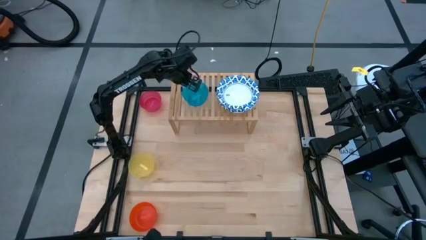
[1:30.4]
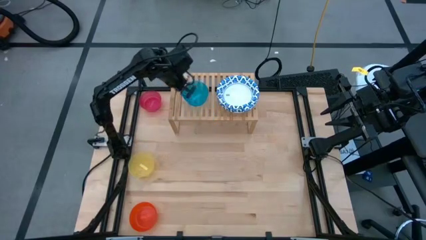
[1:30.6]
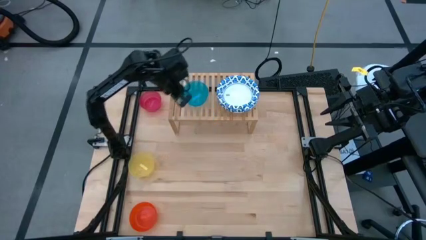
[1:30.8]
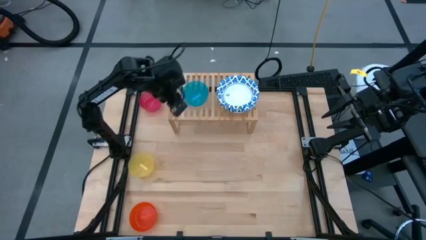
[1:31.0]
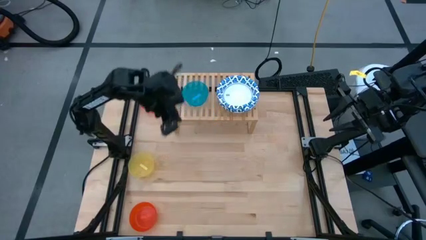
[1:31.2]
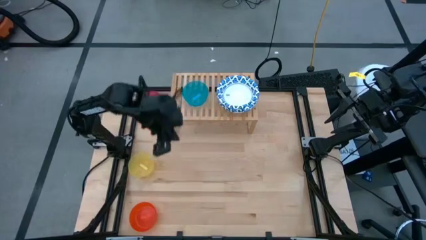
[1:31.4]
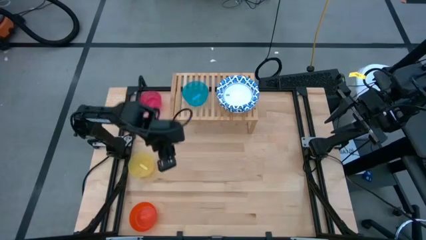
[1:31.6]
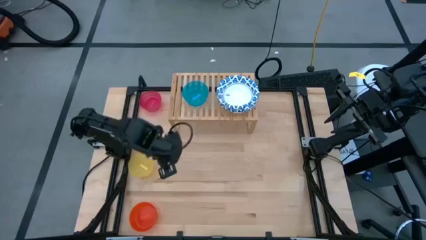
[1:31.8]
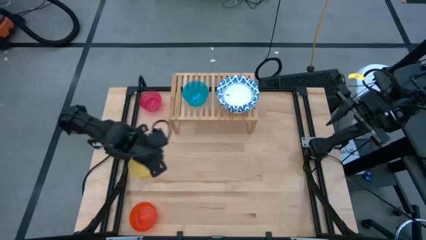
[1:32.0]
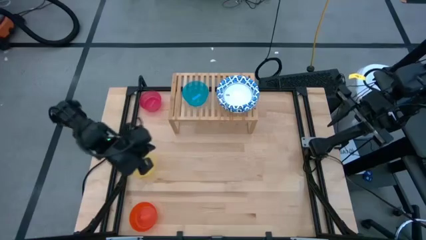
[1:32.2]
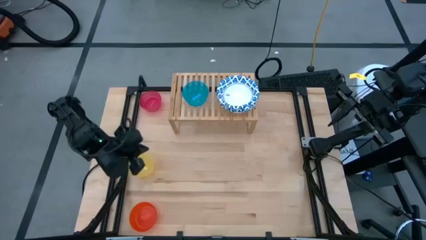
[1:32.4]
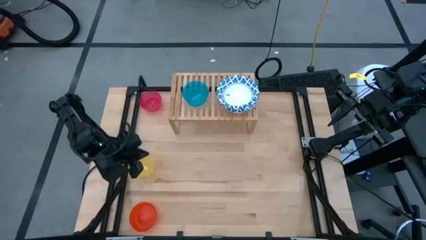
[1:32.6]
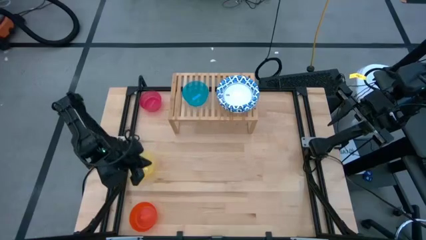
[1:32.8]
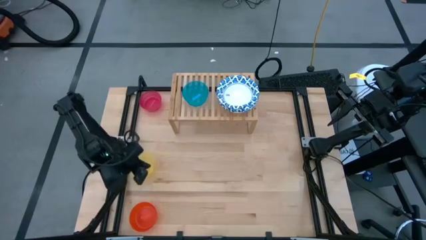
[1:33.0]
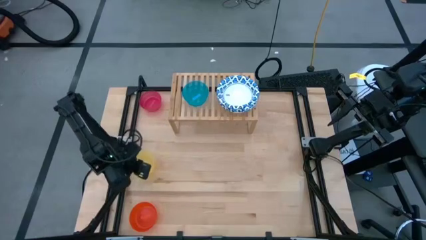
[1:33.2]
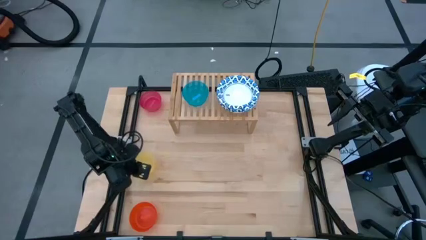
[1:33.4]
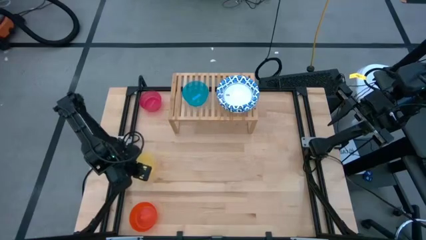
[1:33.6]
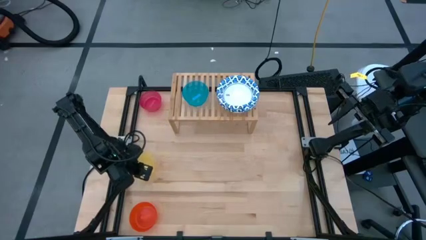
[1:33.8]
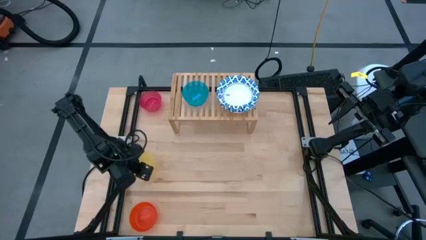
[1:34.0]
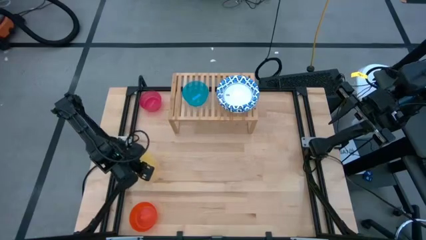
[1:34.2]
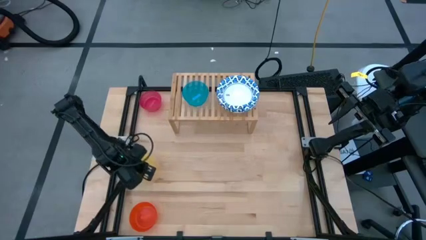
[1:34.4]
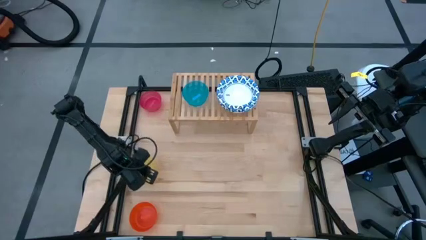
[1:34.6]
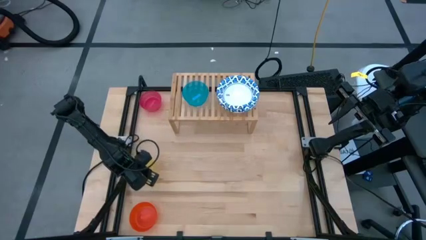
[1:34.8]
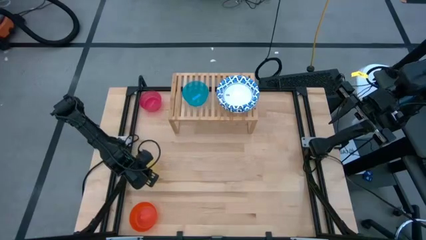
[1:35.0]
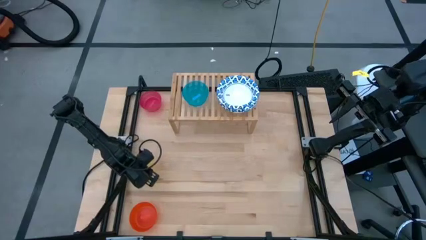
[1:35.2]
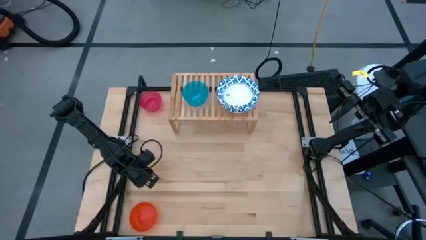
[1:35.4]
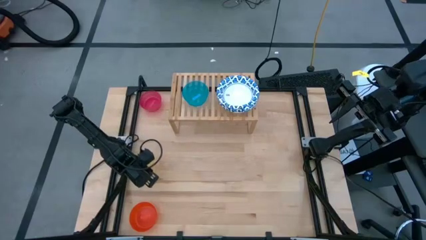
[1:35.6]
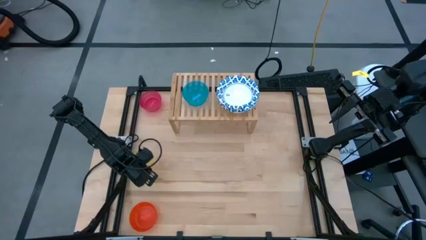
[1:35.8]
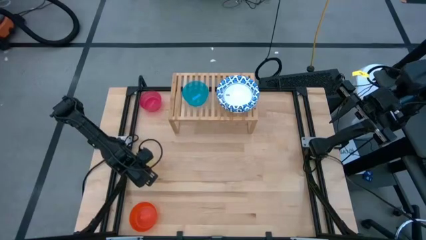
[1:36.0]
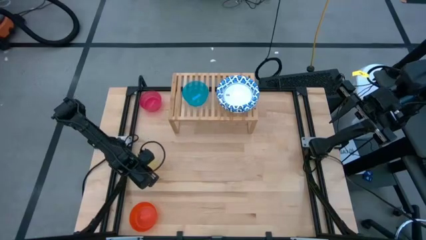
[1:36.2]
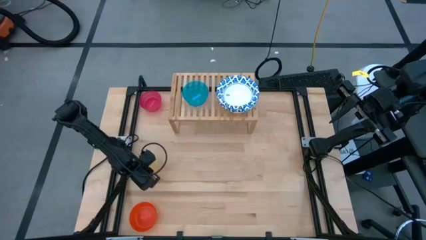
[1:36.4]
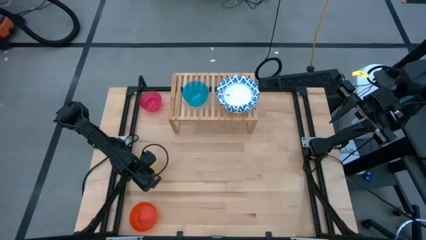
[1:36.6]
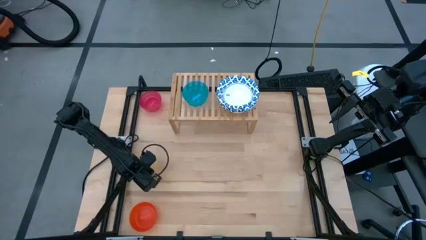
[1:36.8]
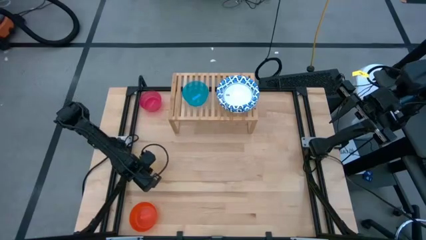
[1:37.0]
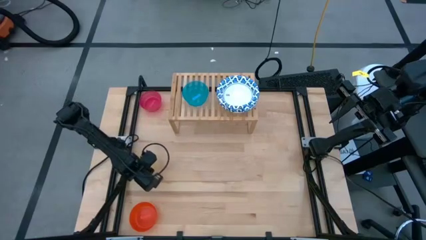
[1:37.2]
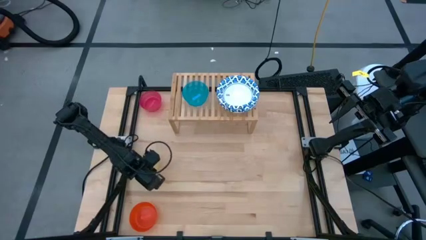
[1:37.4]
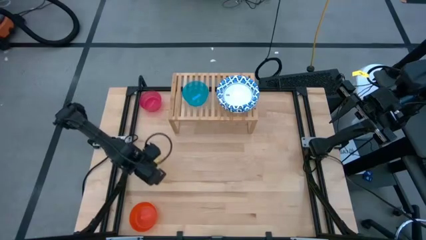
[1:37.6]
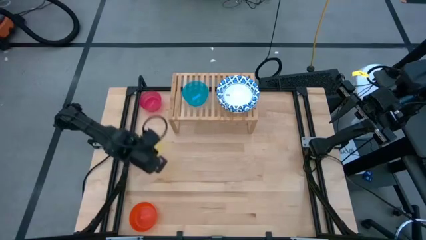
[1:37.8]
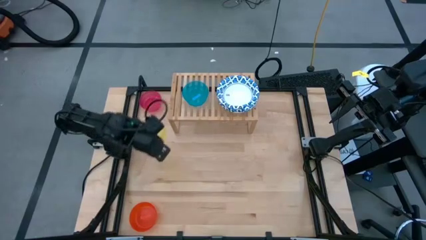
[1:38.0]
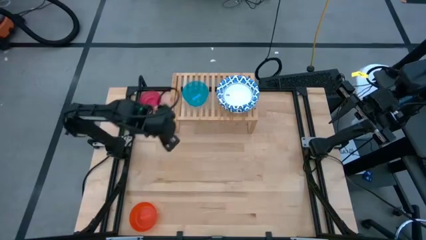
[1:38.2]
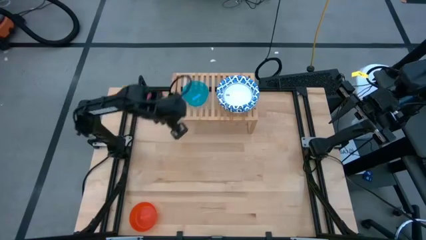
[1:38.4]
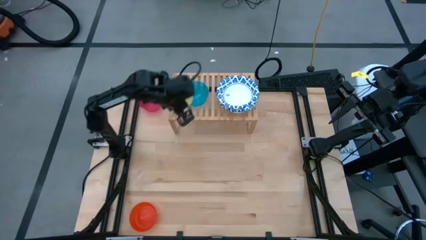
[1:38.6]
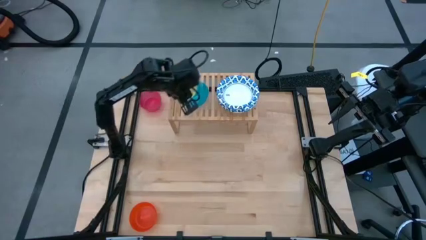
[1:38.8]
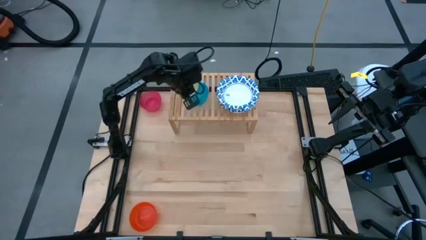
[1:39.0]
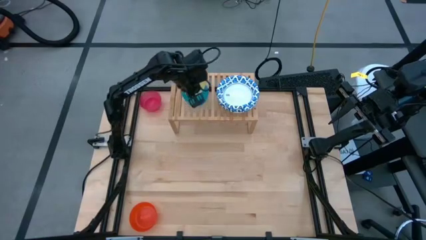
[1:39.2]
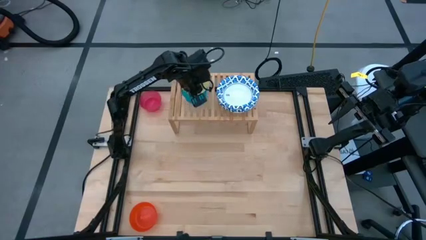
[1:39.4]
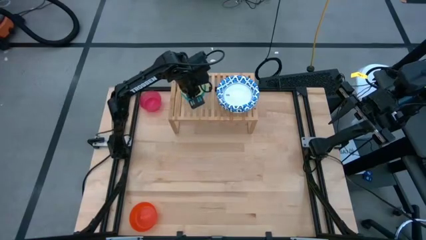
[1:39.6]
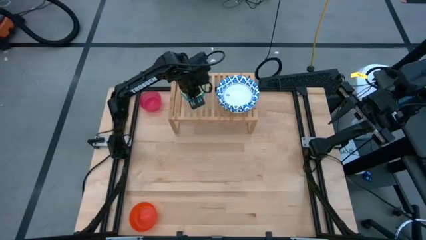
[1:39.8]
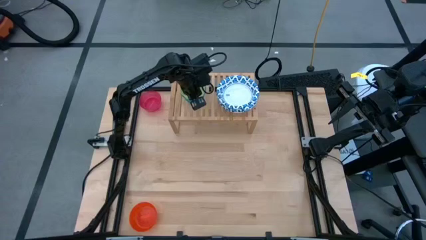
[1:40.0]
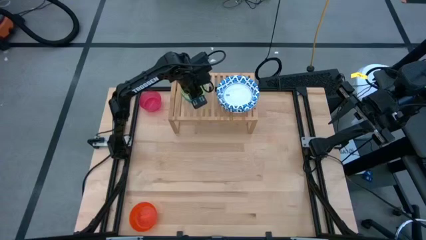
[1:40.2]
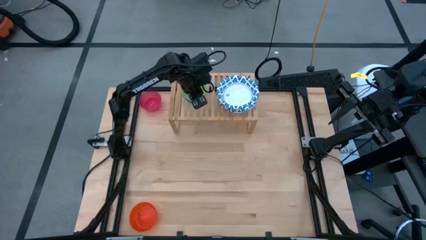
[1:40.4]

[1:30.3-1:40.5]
Task: Place and stack bowls onto a shelf
Stack the yellow bowl on top of the blue bowl on the shelf
